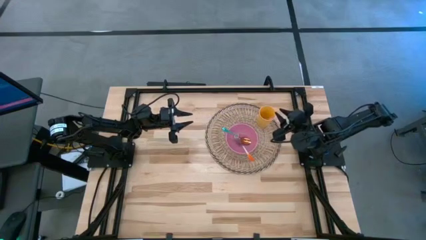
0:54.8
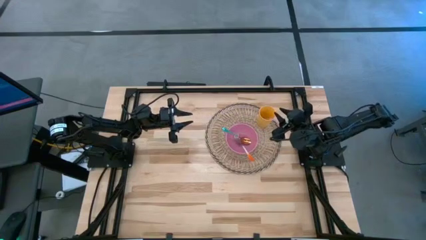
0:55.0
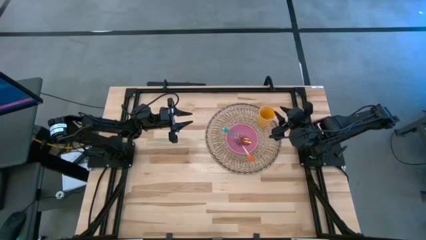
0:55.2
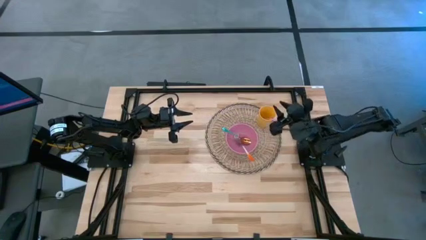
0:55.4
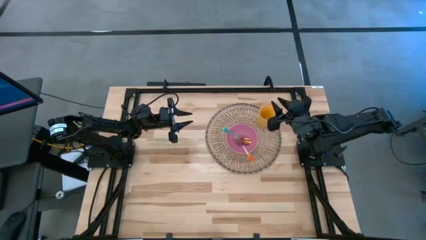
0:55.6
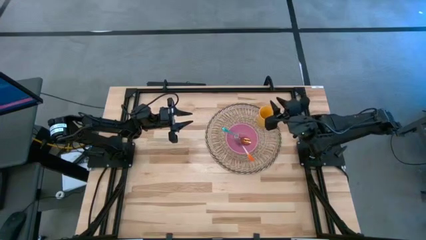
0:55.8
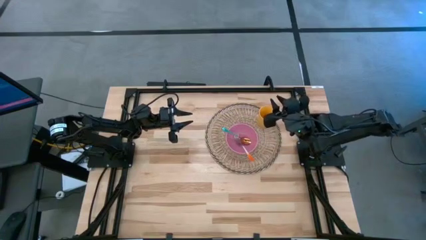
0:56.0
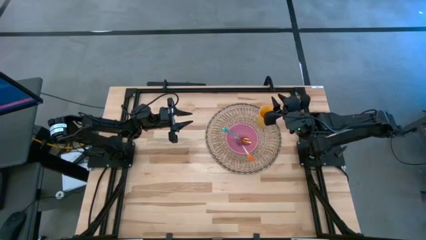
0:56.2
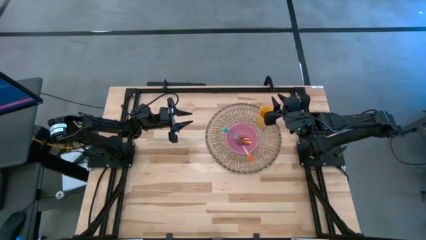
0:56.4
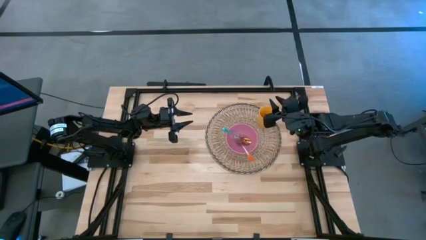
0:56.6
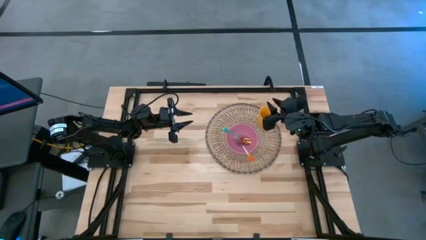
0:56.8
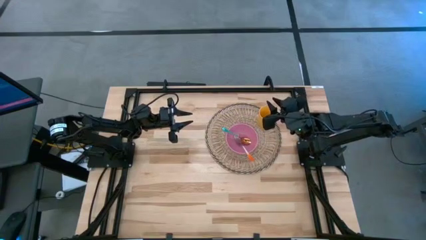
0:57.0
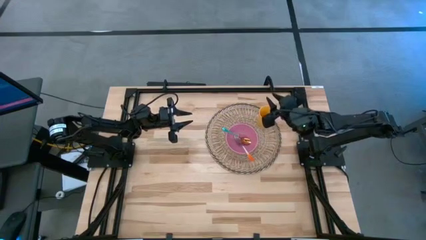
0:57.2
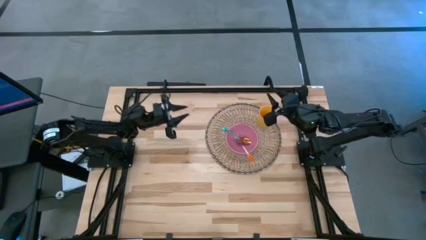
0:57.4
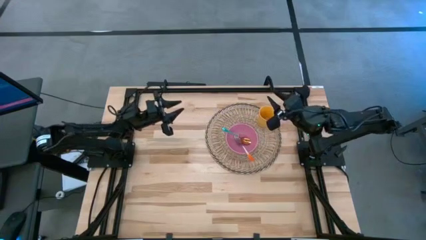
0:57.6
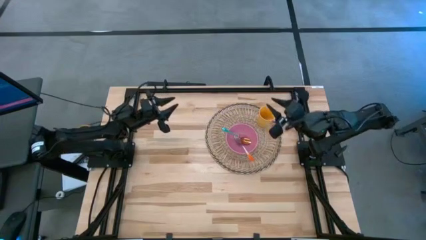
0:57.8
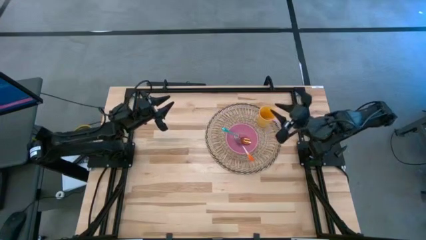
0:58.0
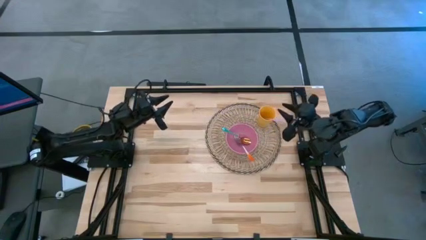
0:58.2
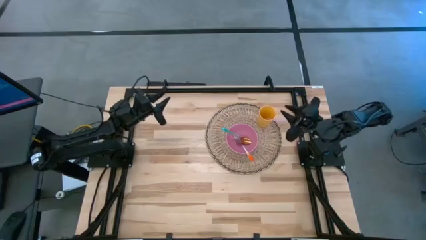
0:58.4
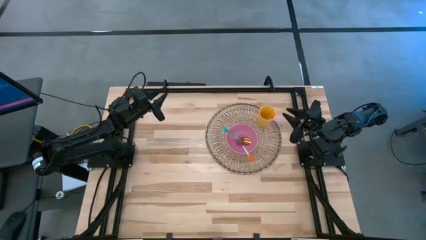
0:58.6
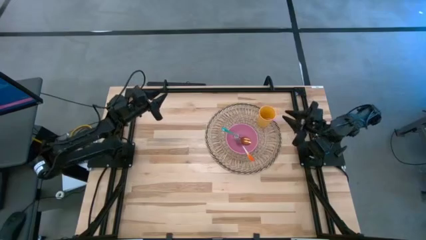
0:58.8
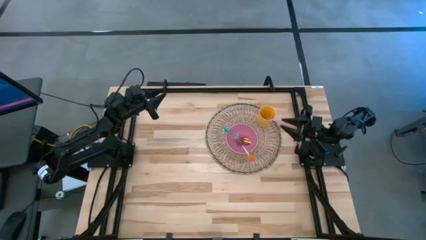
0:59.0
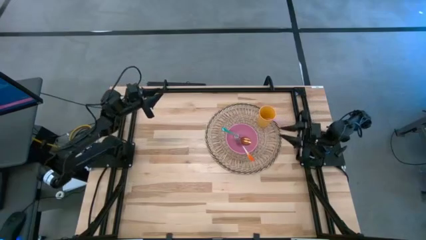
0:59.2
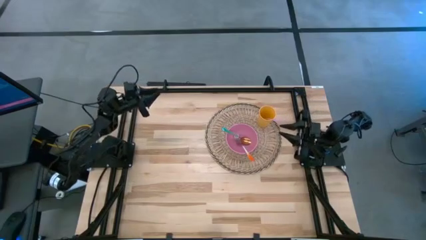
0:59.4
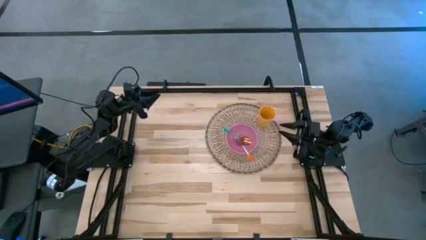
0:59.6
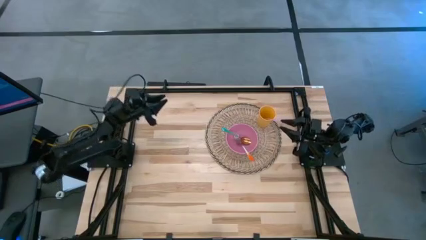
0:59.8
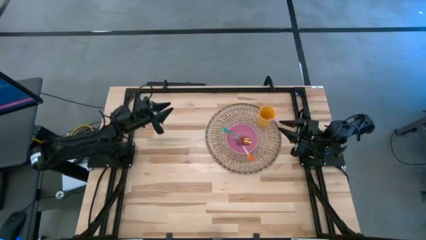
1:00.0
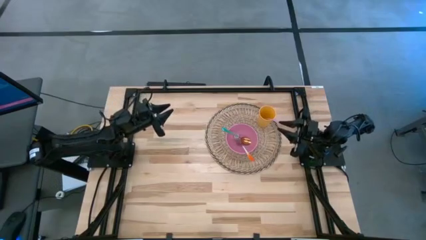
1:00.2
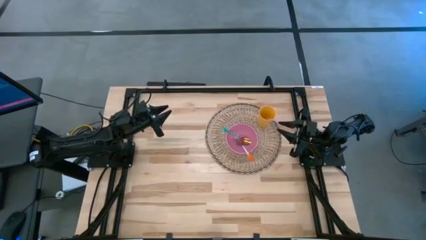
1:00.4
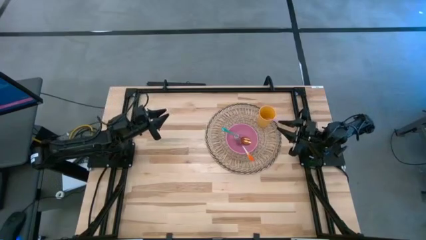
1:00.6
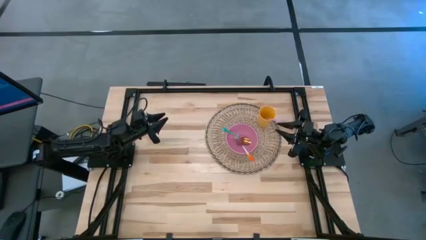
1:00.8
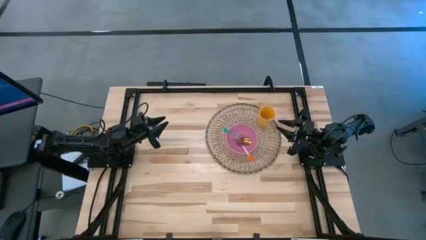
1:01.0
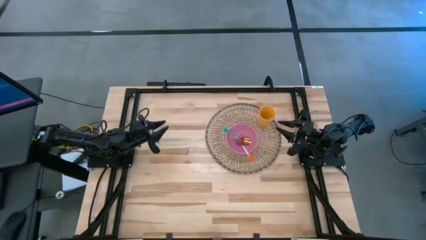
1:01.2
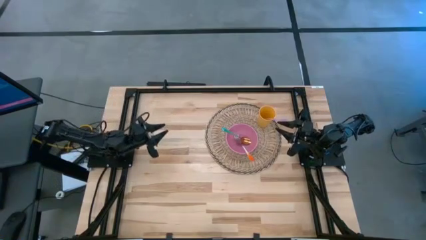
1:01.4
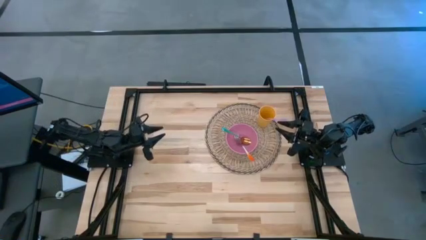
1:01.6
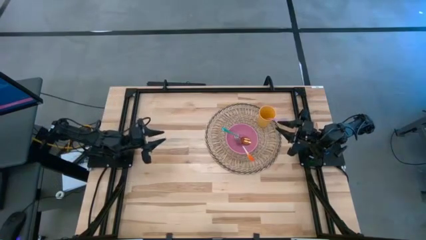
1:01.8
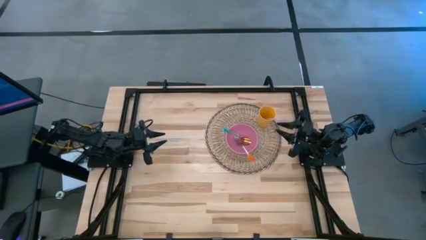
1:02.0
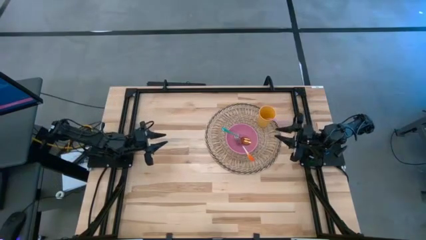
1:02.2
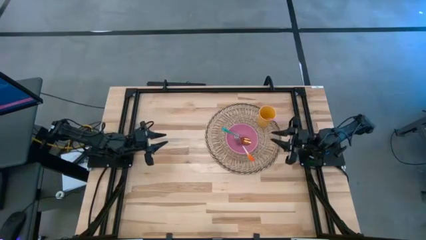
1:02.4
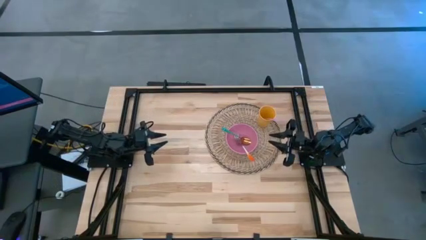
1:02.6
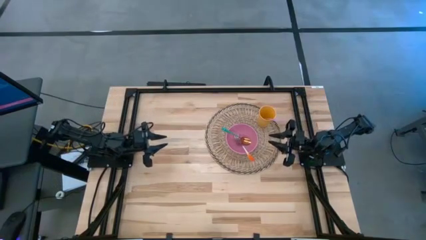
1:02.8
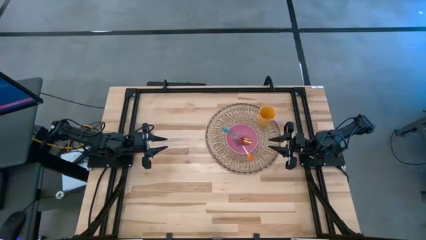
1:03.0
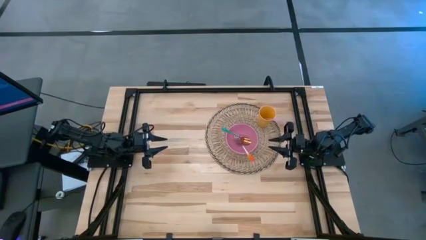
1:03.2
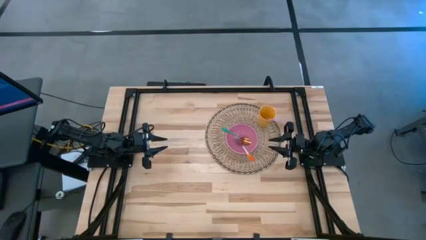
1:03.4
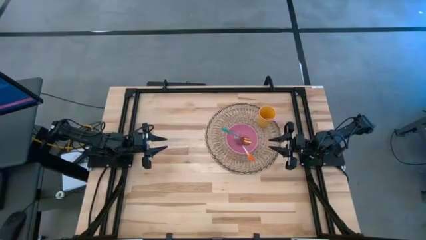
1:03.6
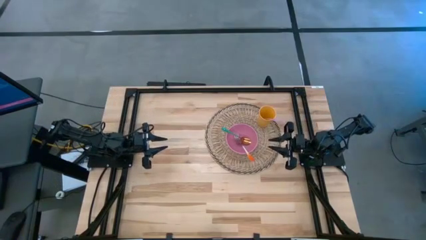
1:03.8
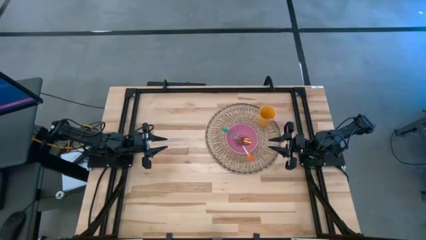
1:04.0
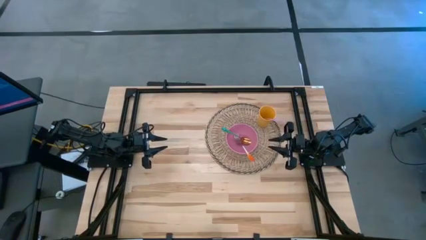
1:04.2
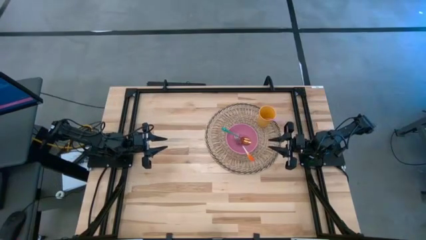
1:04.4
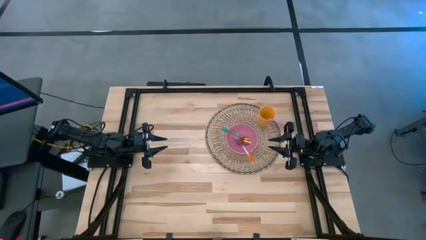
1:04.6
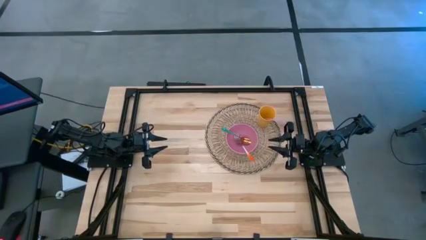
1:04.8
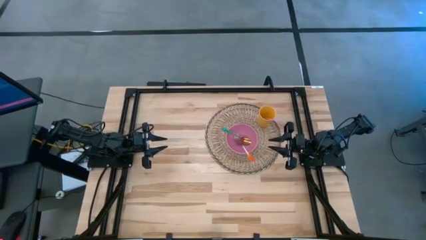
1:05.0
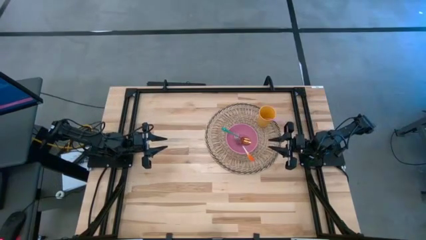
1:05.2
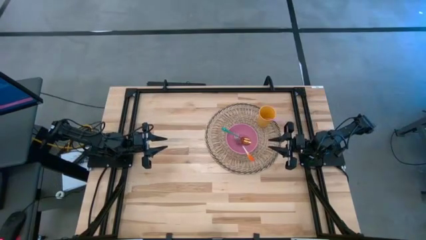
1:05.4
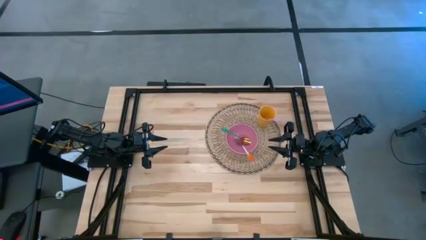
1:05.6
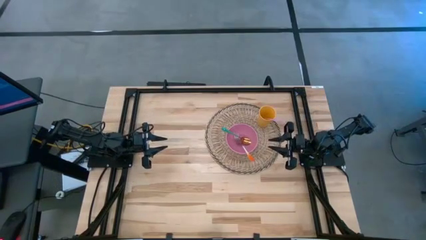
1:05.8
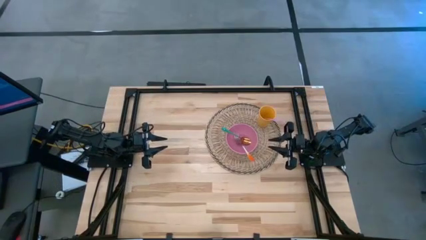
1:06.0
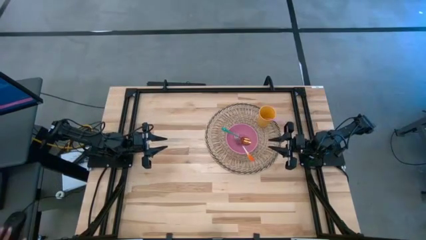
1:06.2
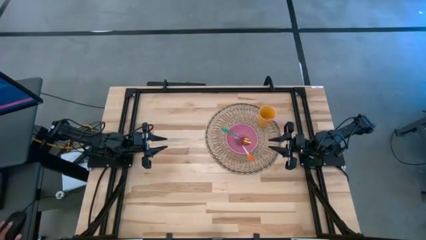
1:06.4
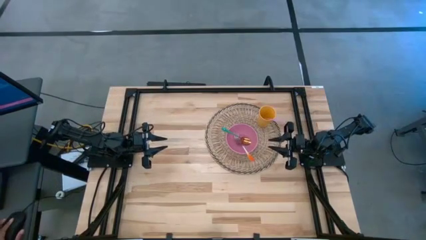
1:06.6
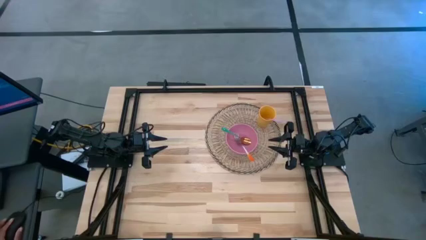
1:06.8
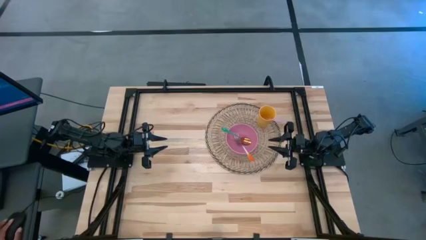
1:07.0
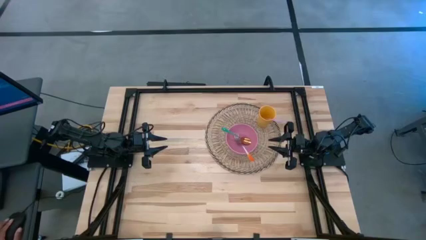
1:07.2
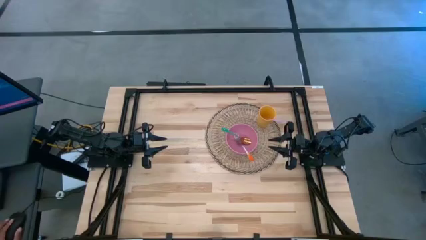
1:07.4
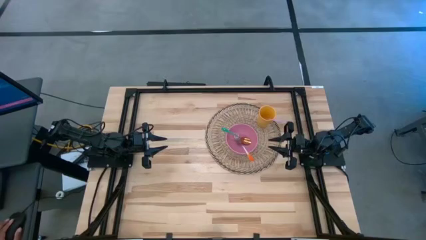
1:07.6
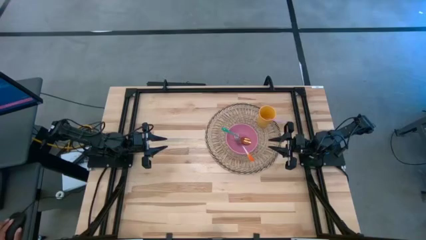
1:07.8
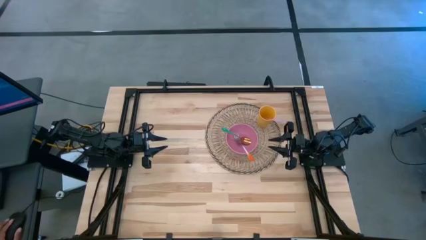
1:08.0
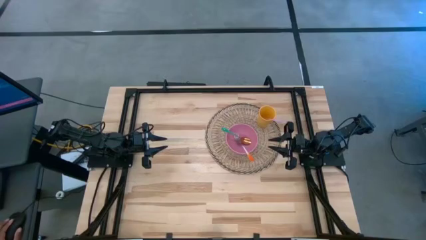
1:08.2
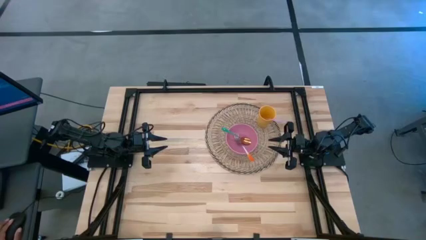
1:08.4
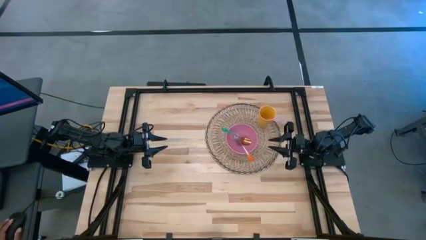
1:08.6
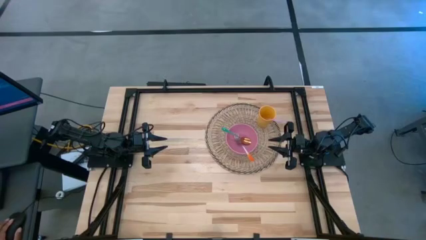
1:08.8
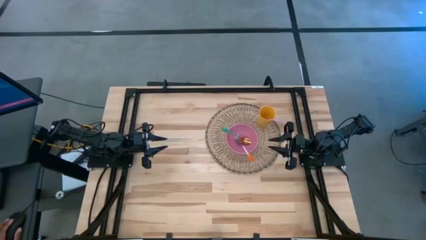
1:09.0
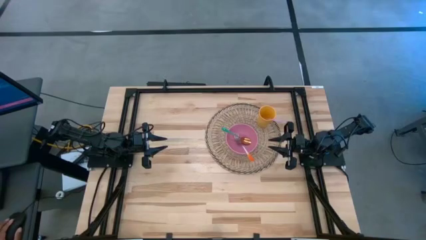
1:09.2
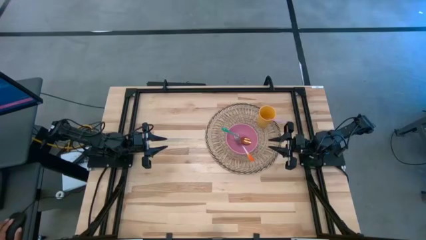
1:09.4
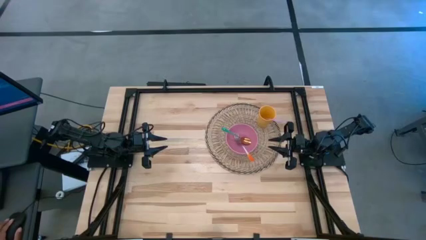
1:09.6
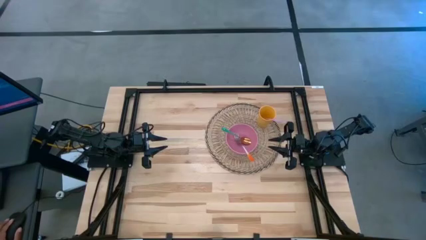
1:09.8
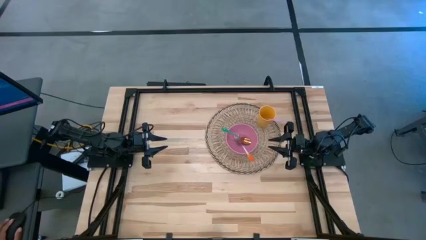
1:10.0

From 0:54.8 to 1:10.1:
Task: Pick & Place Utensil
Return to Home Position

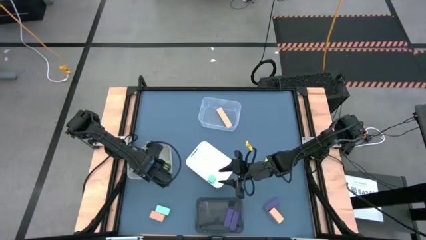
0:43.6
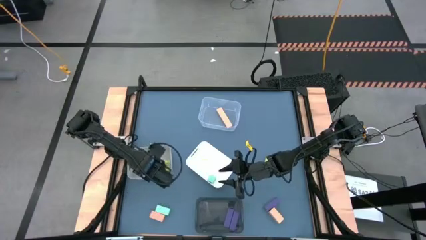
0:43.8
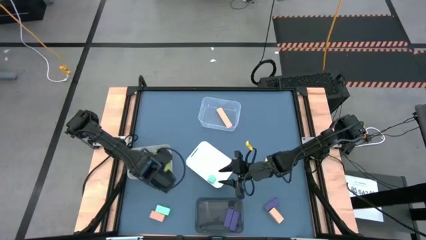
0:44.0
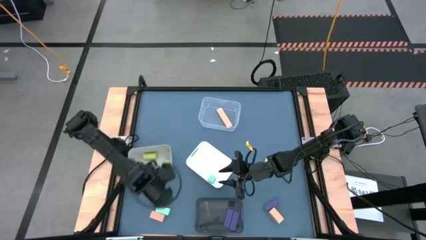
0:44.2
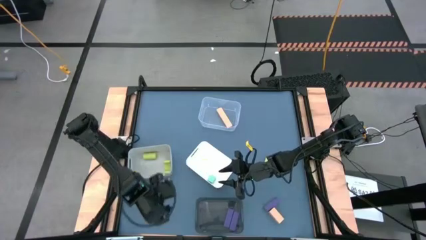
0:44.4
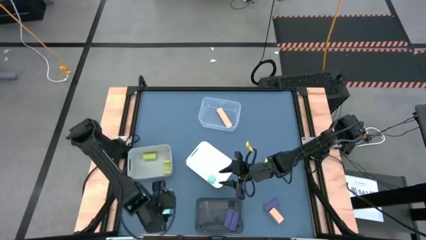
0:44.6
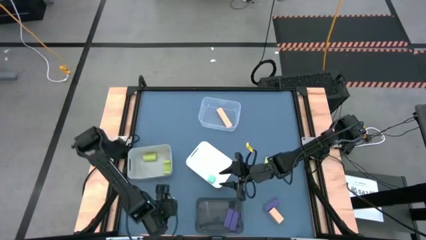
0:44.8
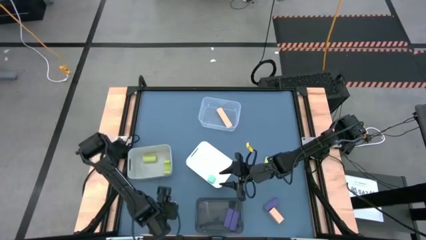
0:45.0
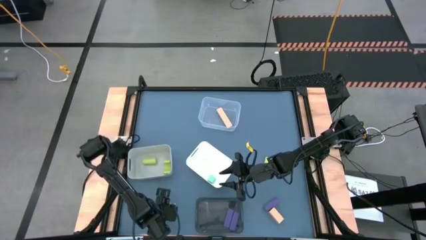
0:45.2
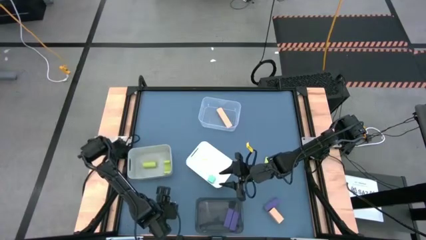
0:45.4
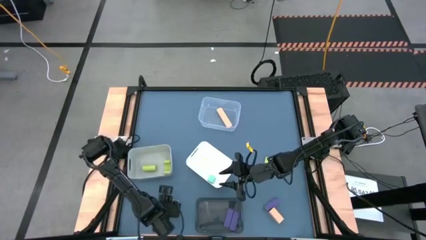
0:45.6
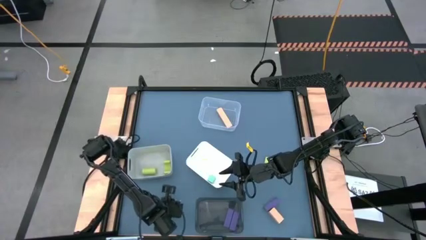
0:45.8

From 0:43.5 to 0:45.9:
Task: Sort & place blocks by color
Put the left blue block into the white bin
